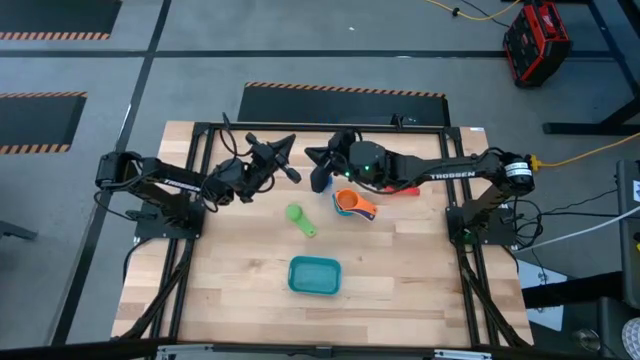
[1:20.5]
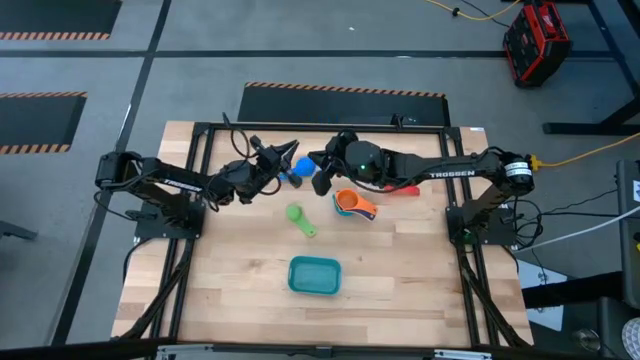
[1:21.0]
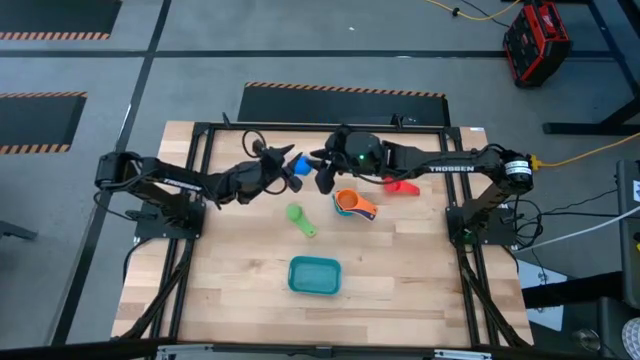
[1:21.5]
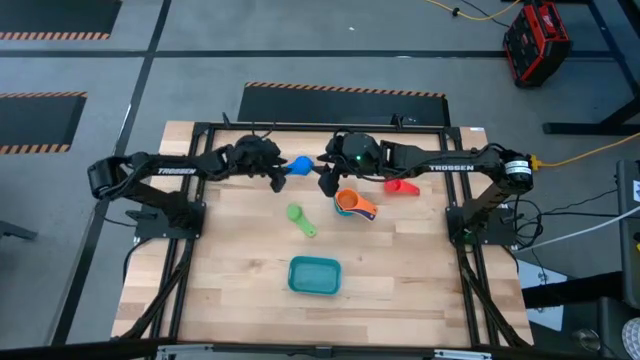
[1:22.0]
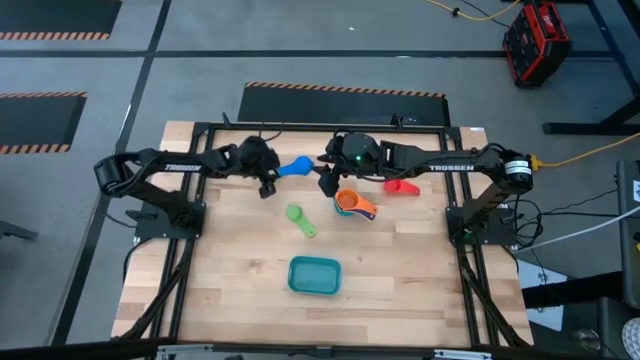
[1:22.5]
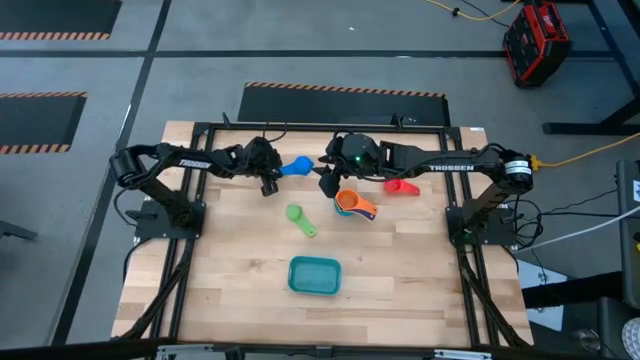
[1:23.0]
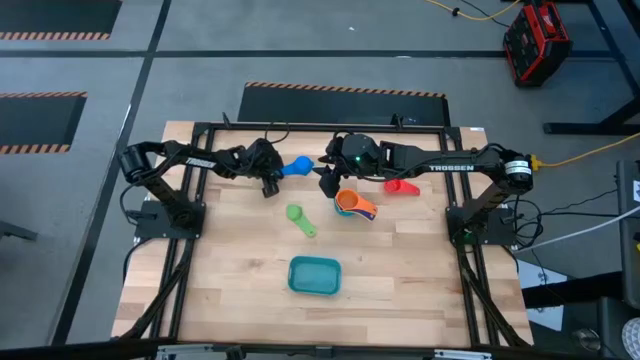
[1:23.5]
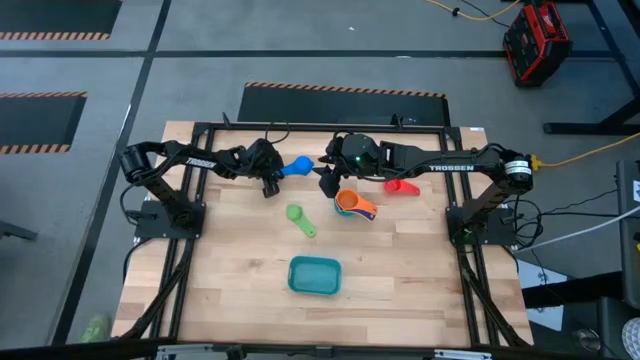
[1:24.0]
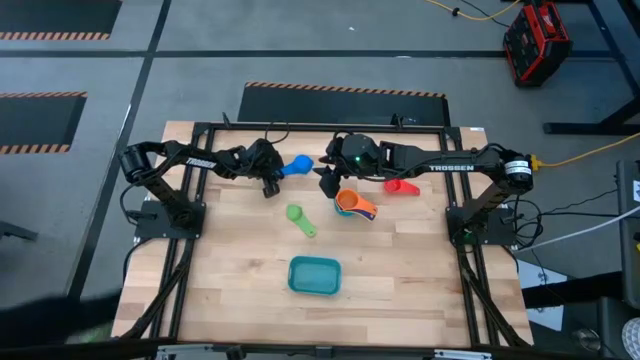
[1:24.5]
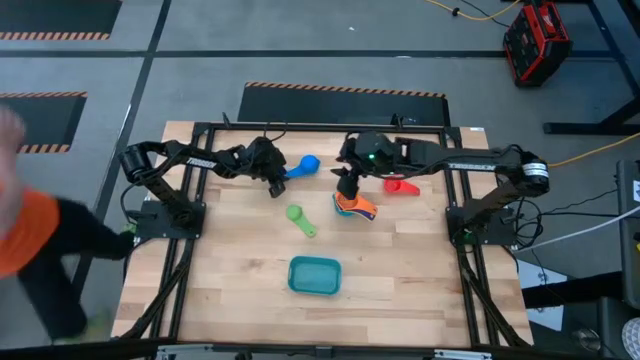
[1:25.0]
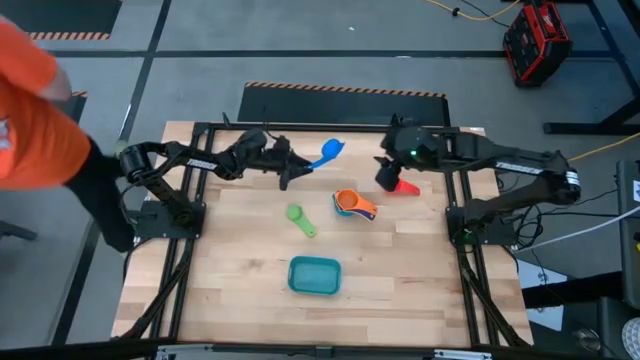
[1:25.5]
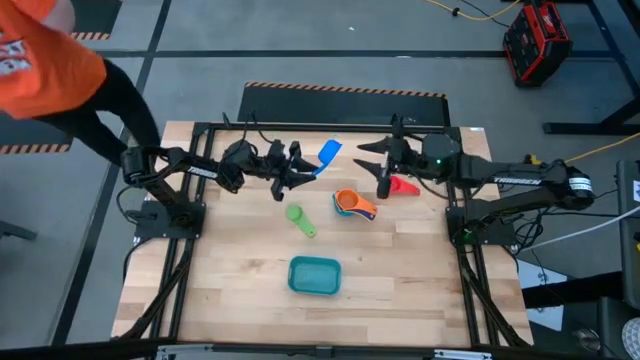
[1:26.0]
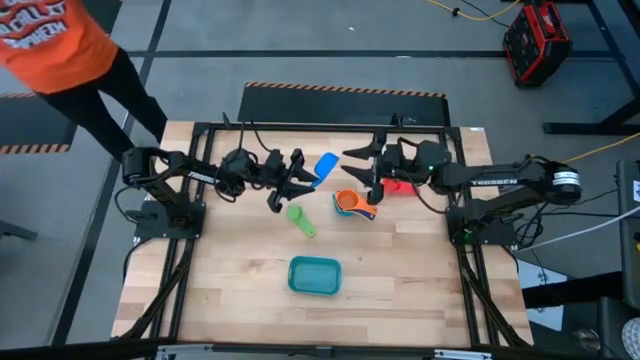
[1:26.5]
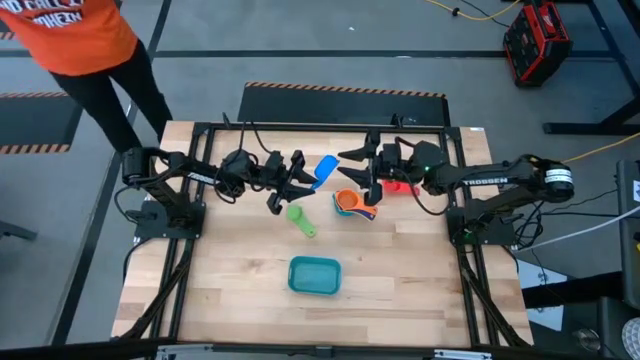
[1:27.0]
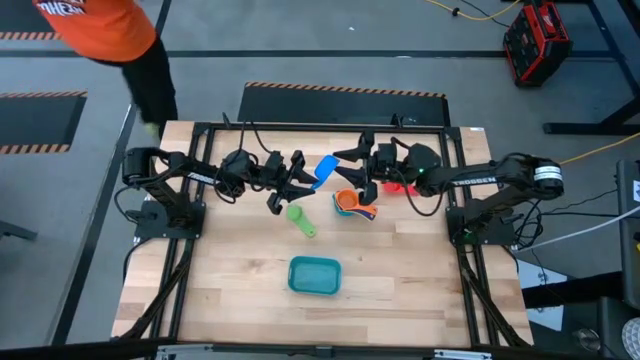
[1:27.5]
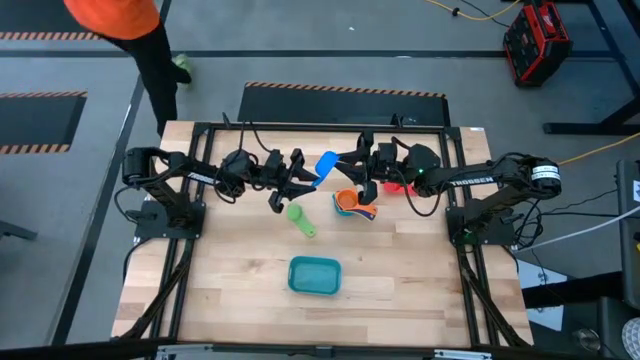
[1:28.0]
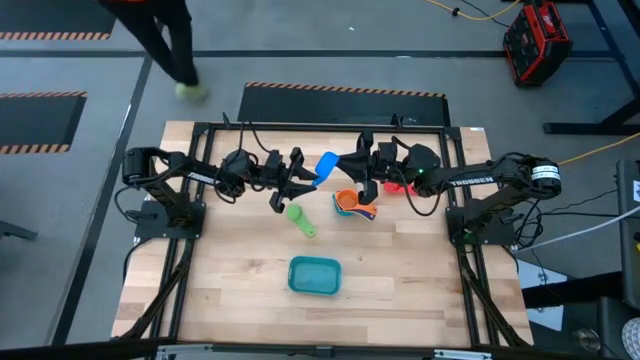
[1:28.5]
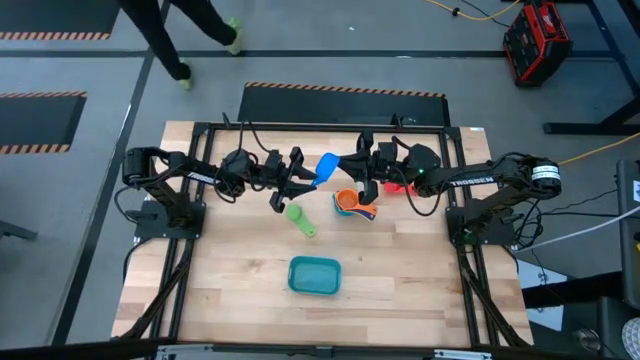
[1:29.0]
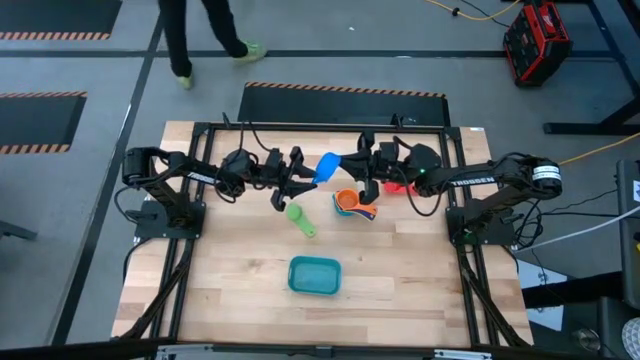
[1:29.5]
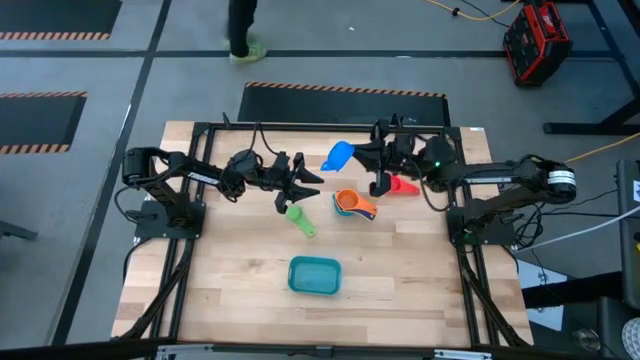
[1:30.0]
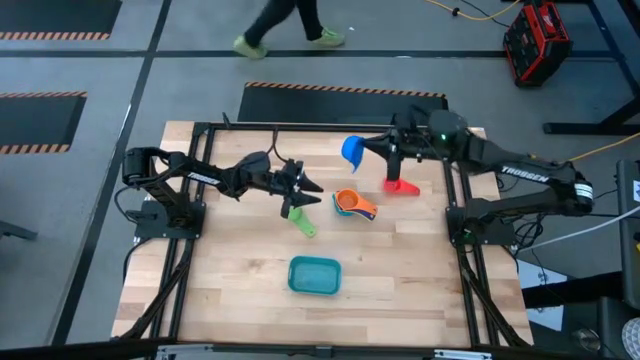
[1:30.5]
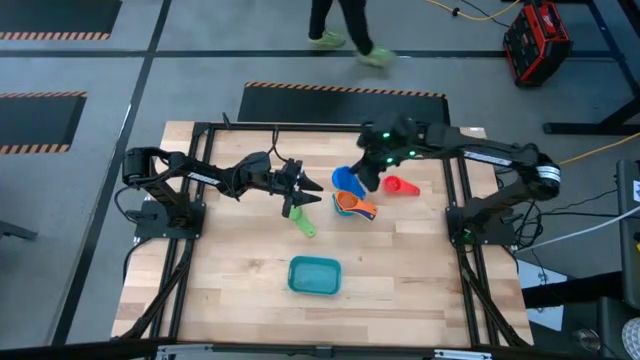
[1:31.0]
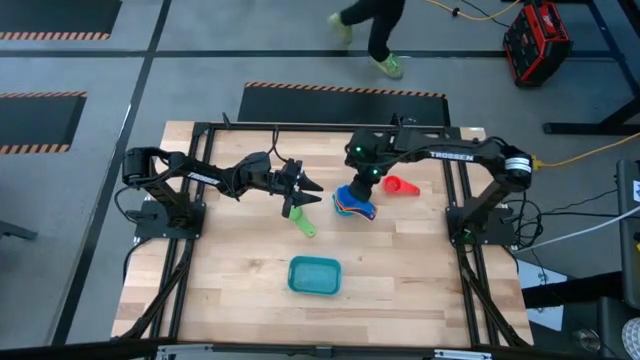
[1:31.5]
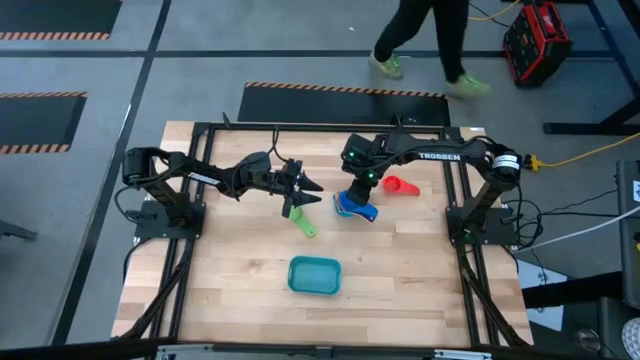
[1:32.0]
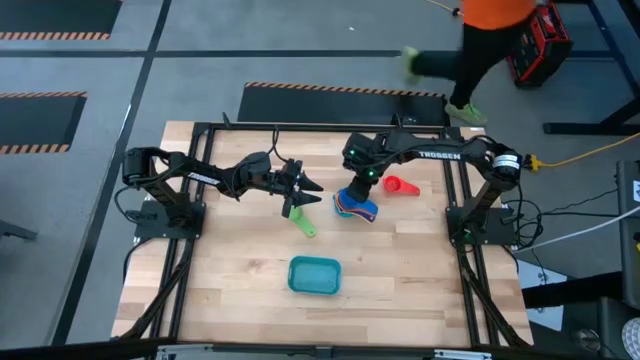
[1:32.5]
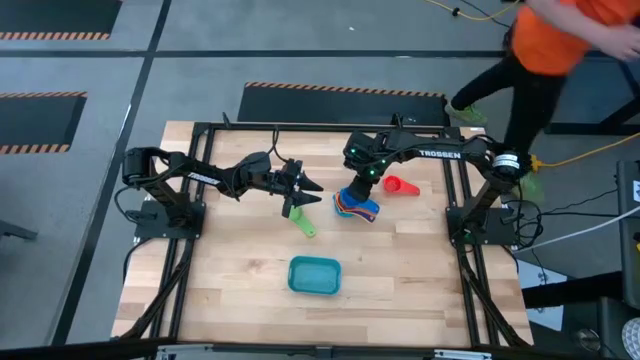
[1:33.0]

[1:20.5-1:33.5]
Task: Nest measuring cups in basket
Stack the blue measuring cup on top of the orange measuring cup

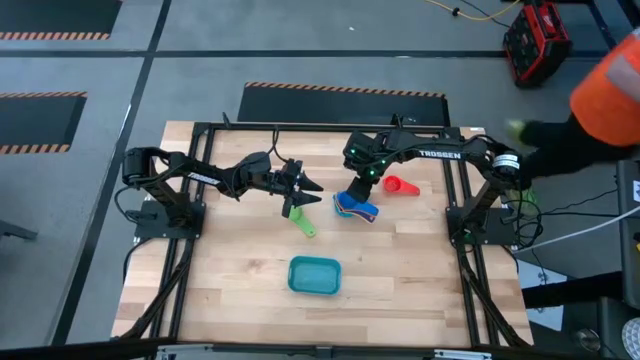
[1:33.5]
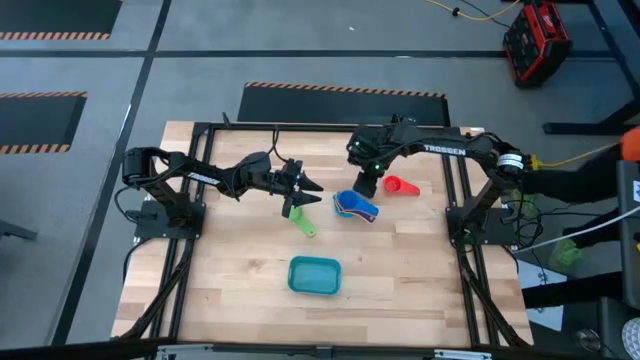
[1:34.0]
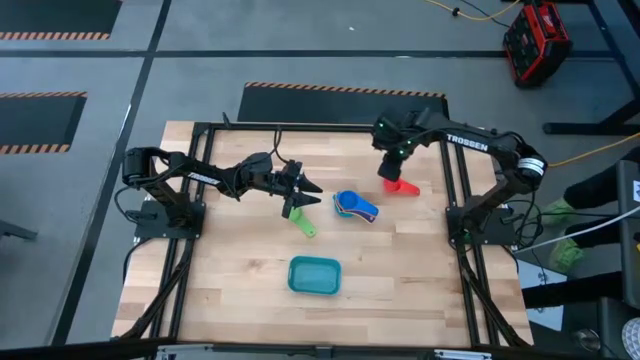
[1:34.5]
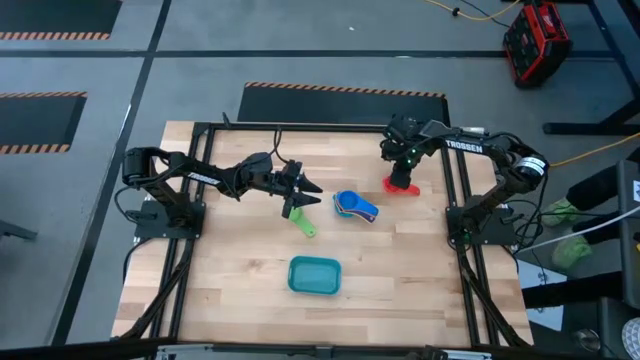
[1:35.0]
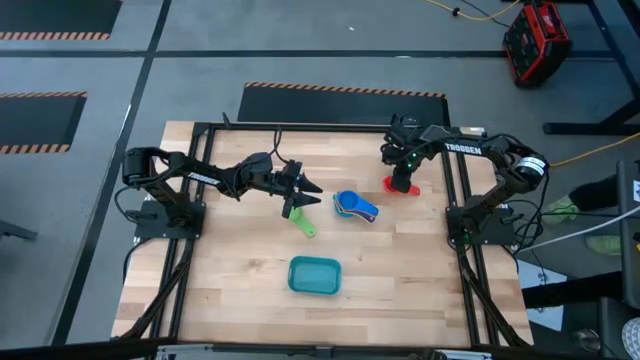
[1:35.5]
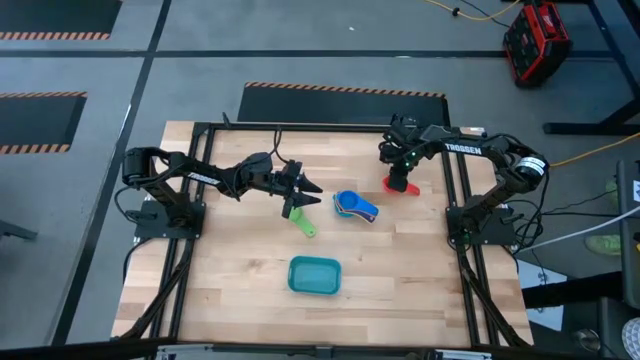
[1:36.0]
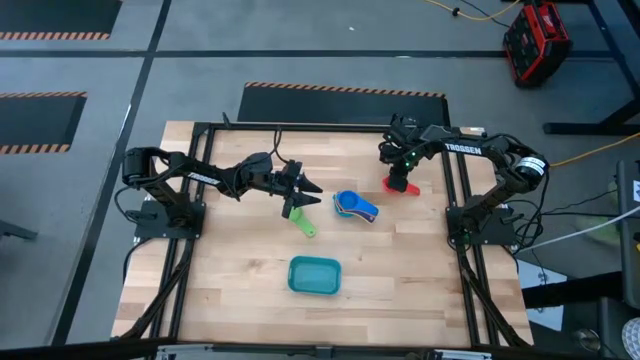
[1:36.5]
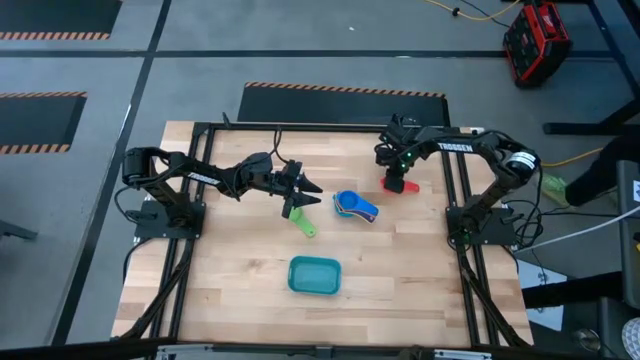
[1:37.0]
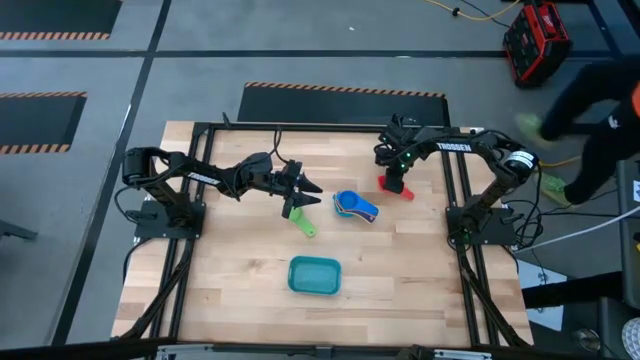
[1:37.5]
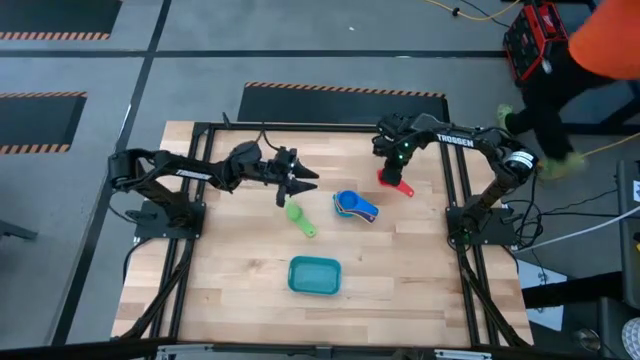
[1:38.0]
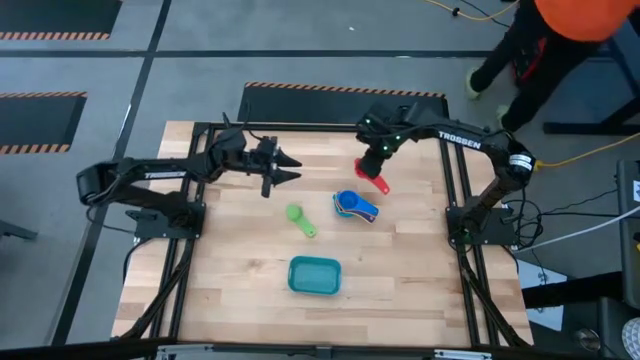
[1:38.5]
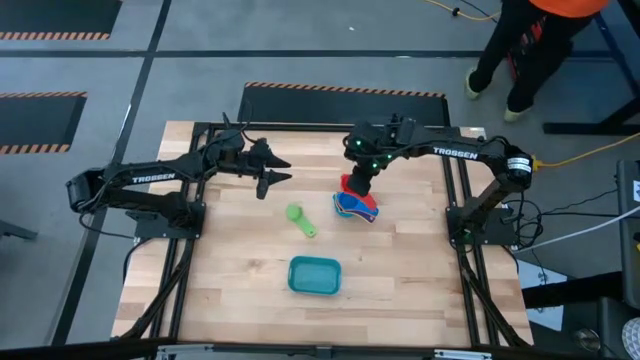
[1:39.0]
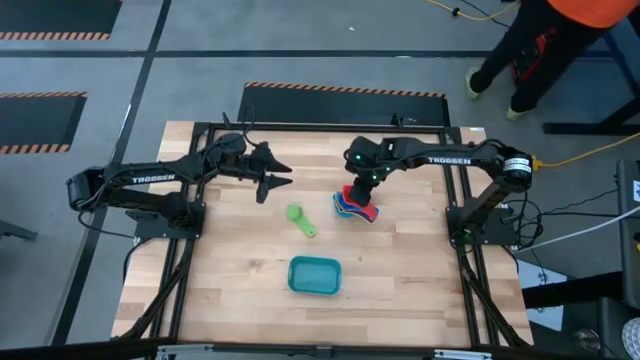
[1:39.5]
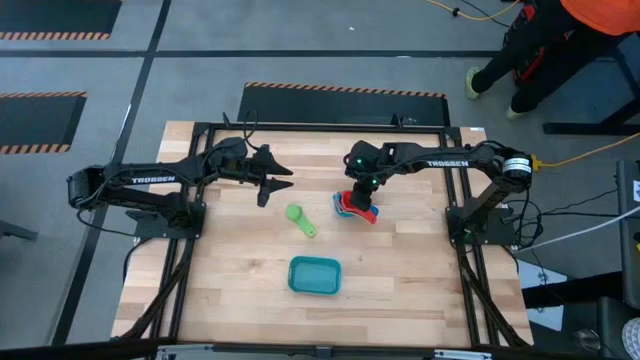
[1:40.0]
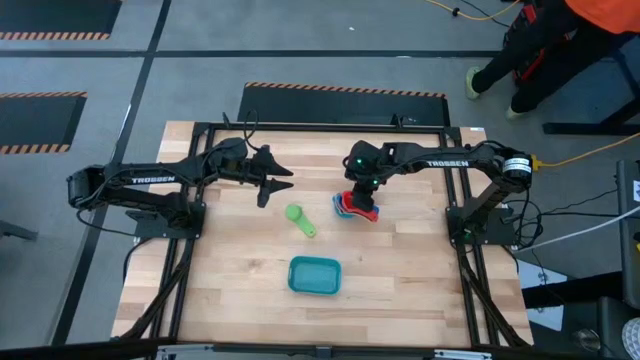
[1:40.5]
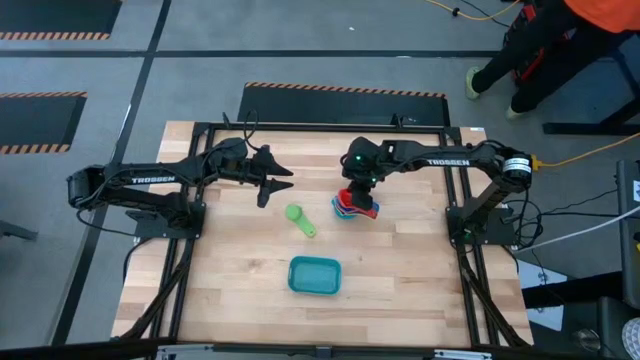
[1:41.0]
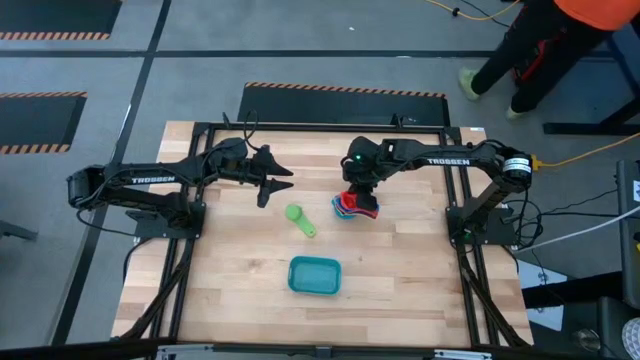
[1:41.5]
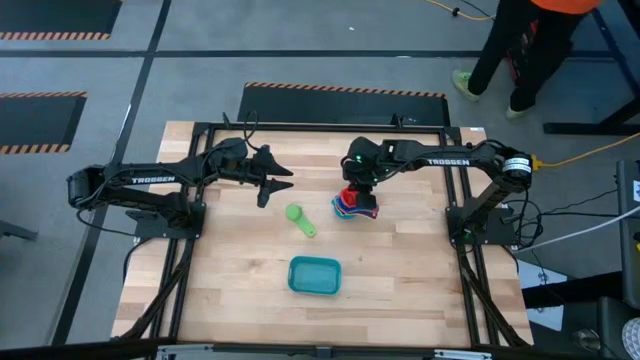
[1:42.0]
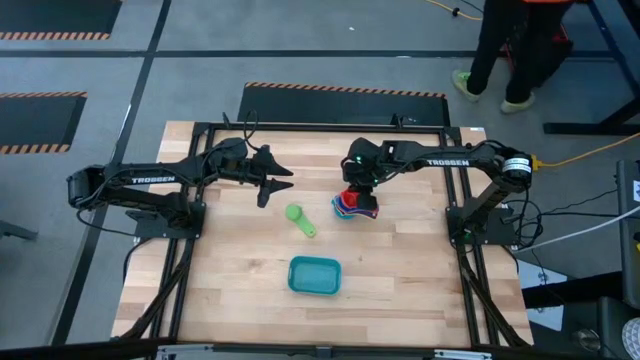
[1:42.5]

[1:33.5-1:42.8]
Stack the red measuring cup on top of the blue measuring cup
